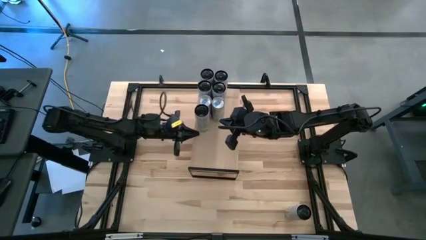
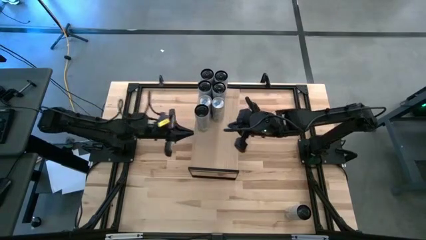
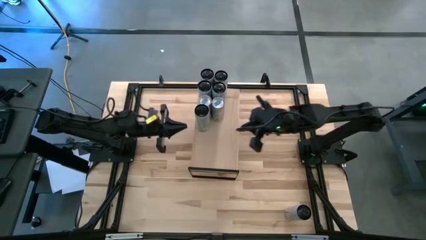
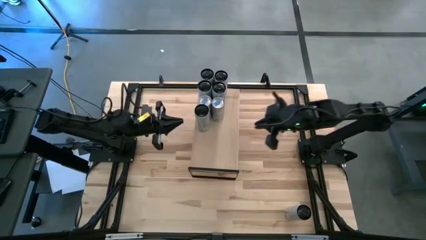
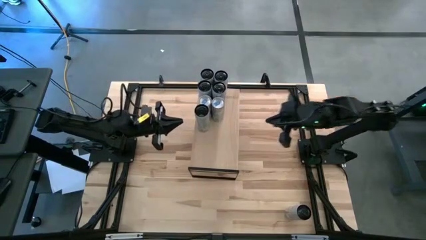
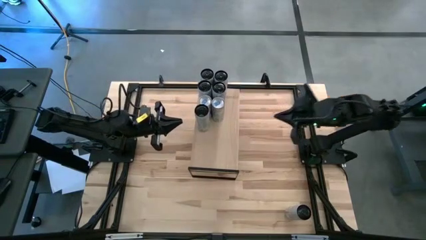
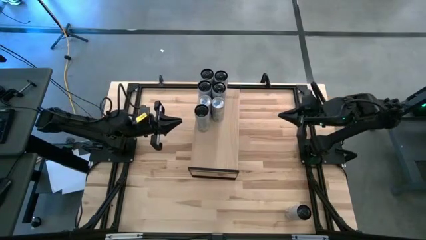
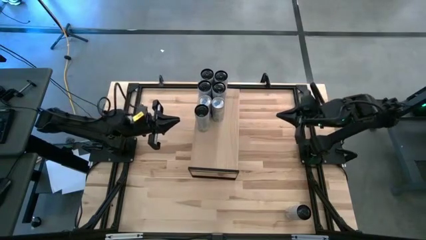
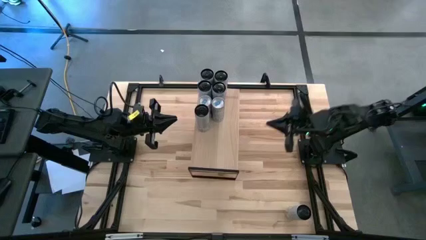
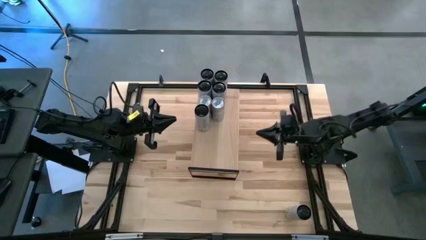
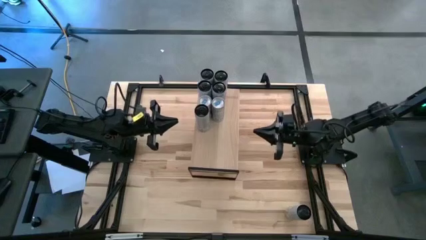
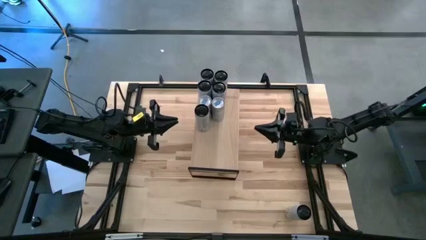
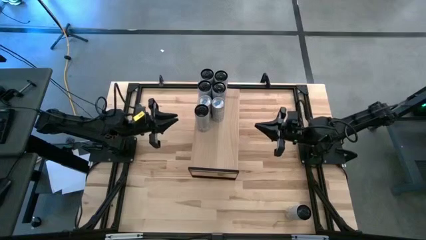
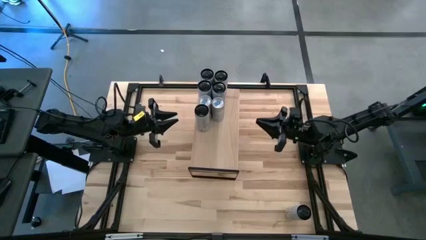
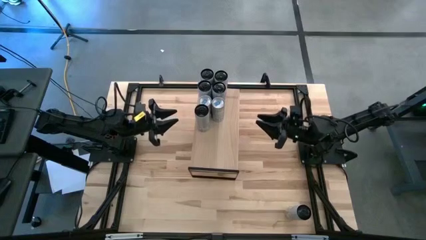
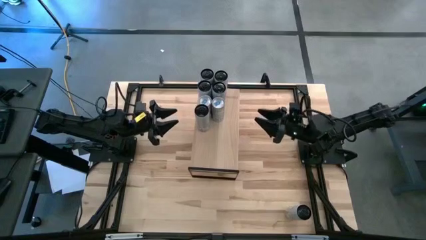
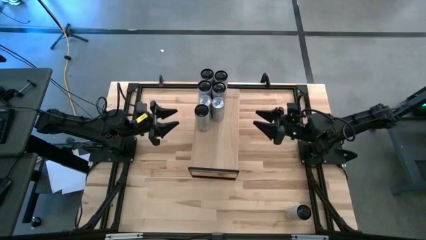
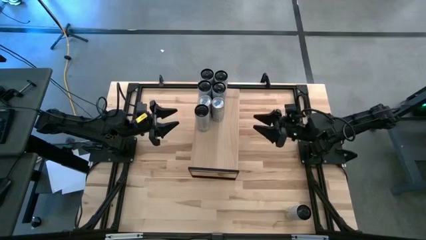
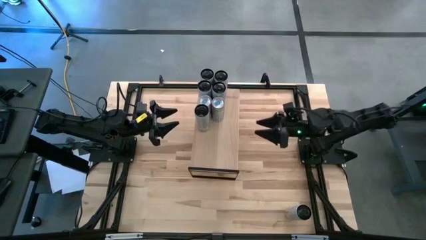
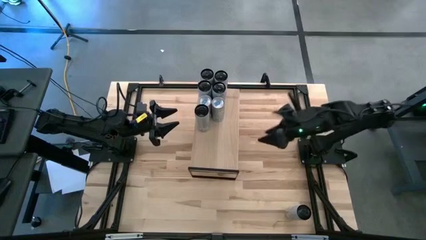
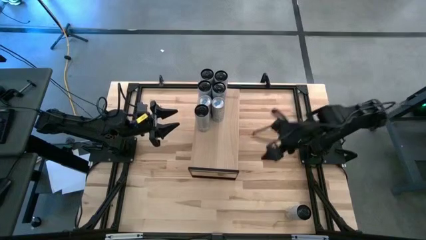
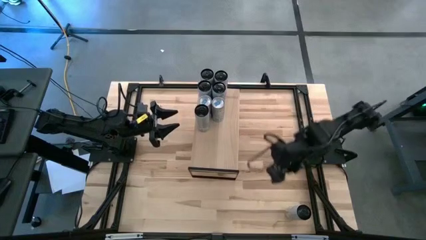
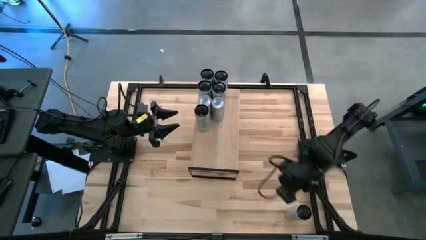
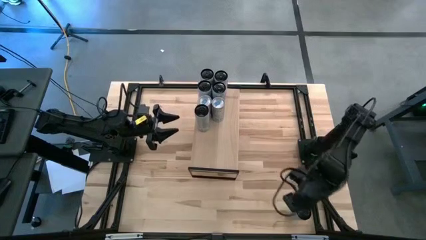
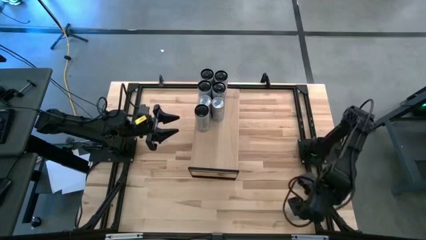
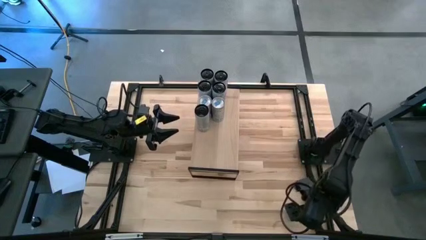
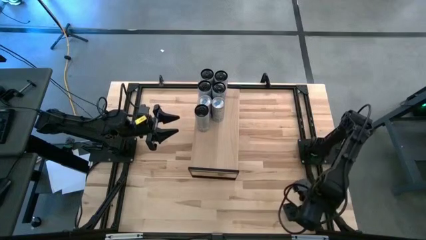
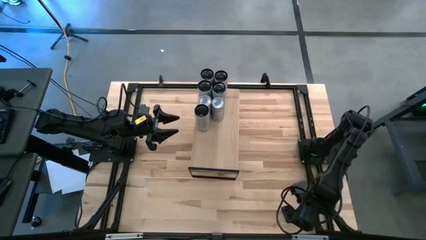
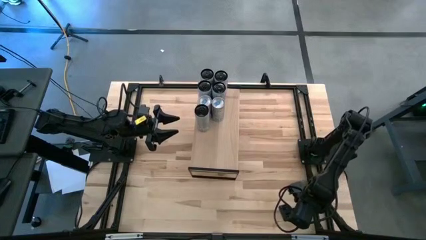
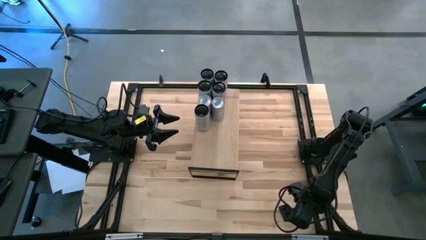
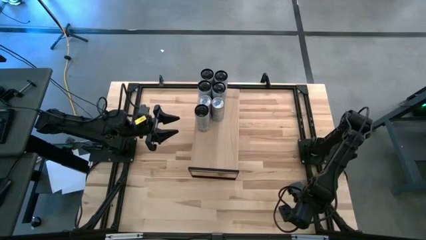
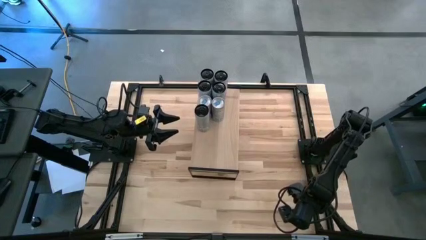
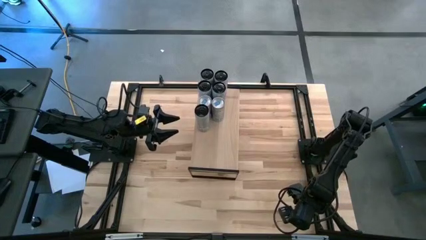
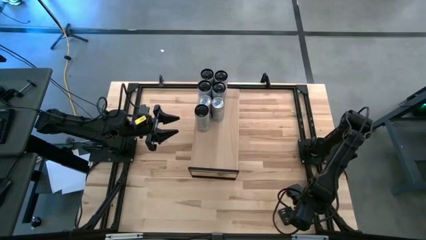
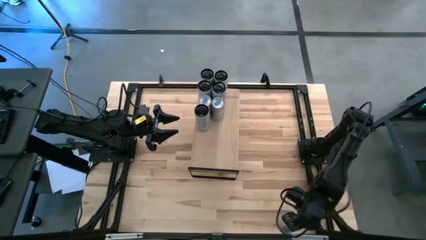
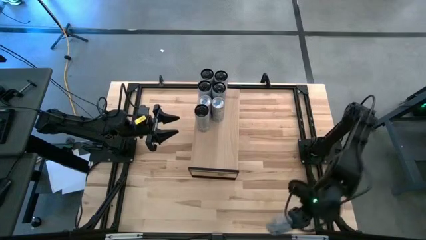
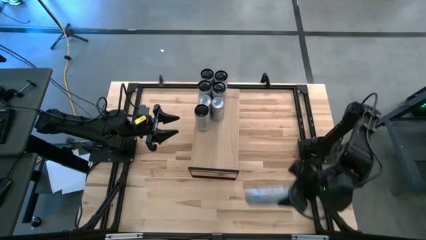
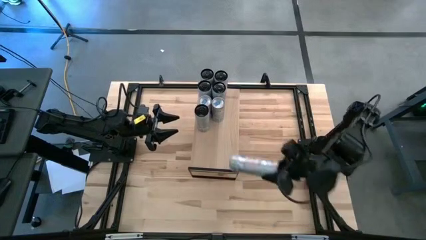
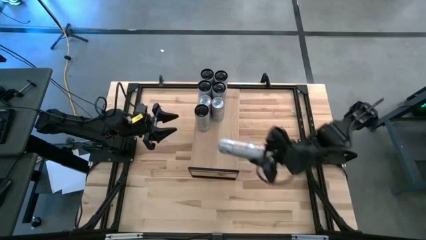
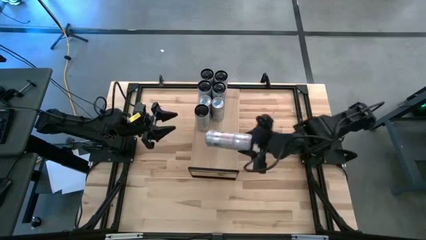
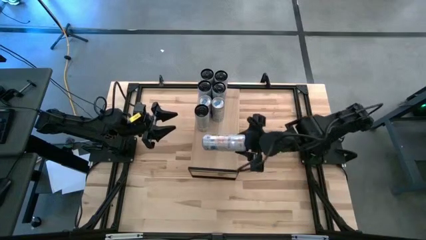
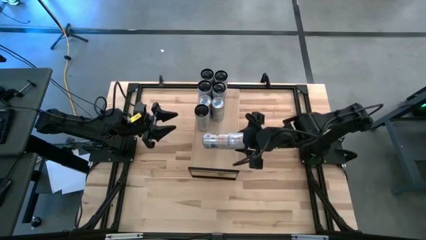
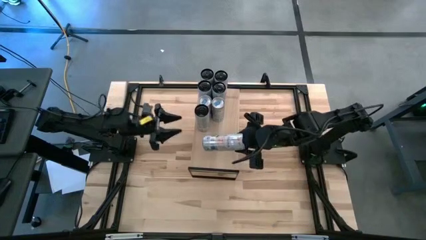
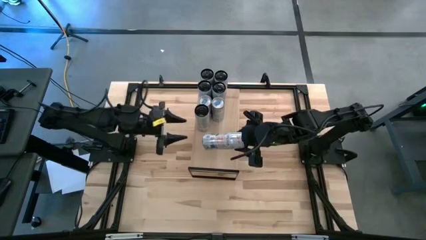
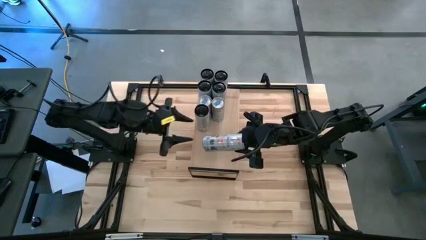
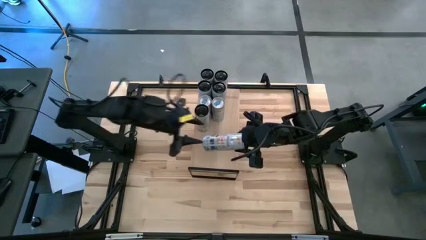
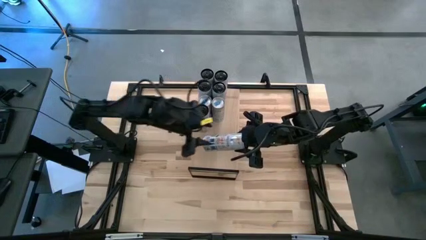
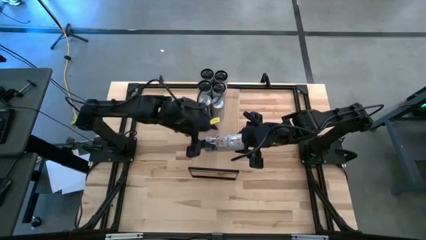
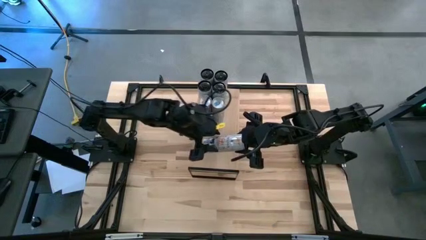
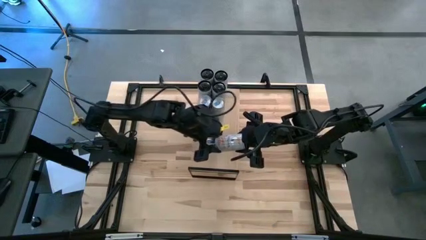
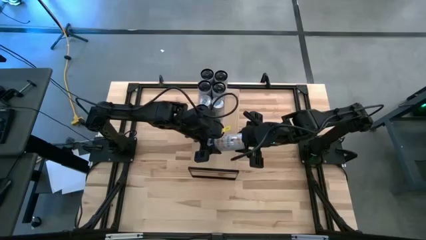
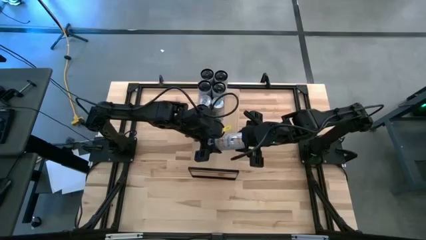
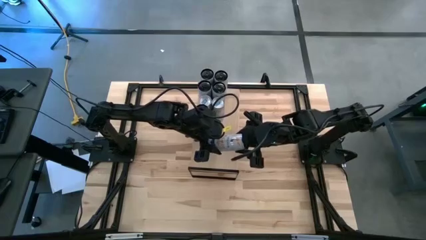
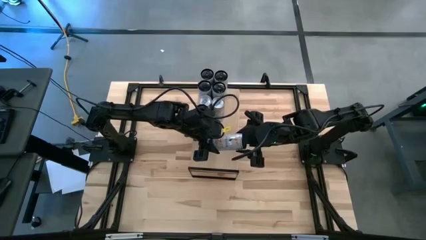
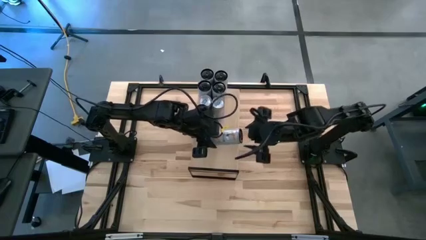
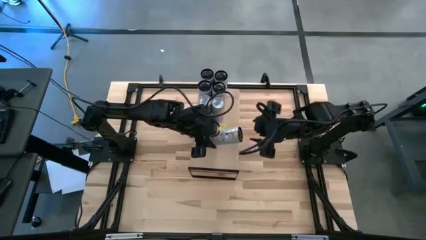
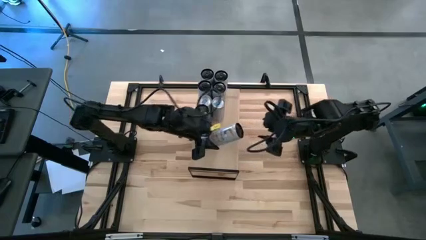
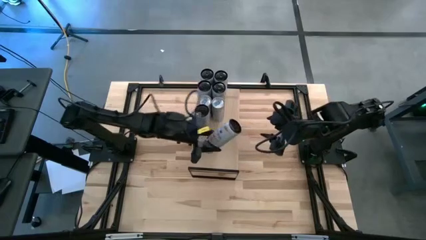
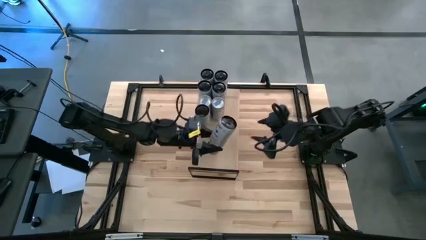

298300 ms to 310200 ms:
Task: Place canned beverage on shelf
Put the white yellow soda can on the shelf aligned with the white yellow soda can
